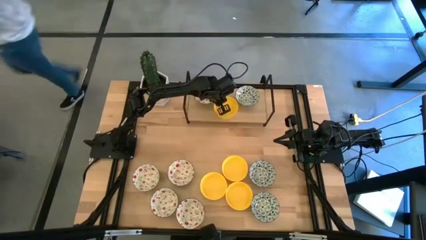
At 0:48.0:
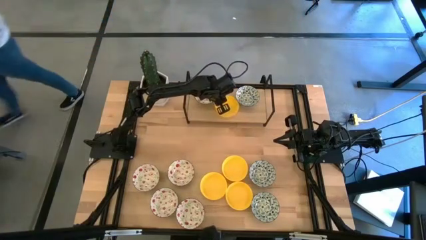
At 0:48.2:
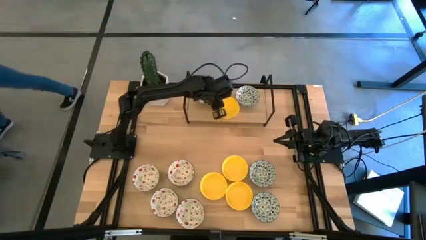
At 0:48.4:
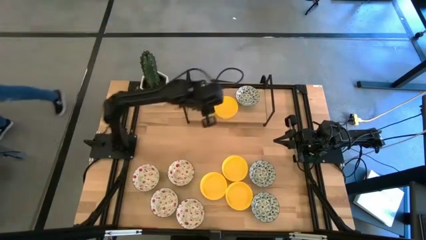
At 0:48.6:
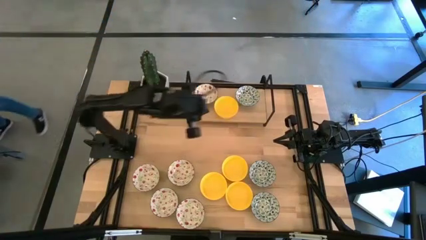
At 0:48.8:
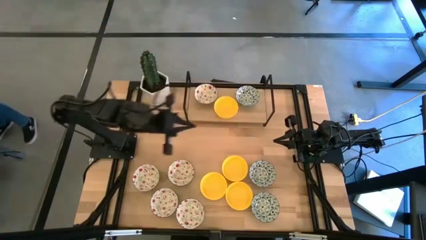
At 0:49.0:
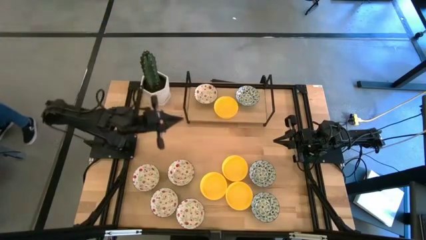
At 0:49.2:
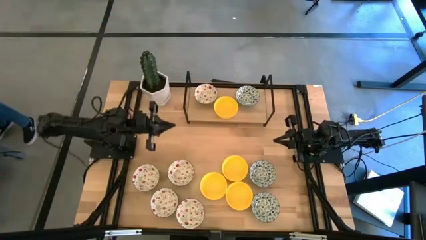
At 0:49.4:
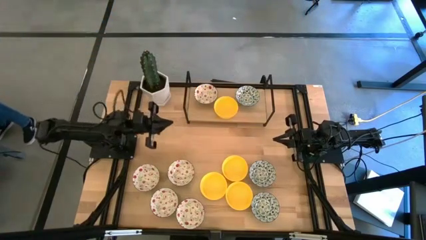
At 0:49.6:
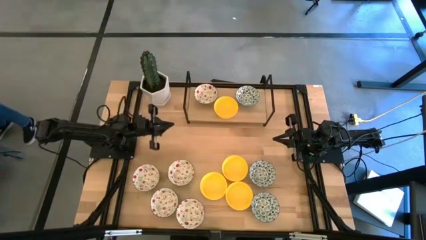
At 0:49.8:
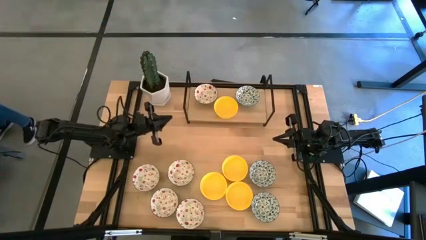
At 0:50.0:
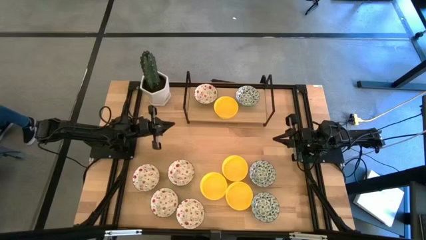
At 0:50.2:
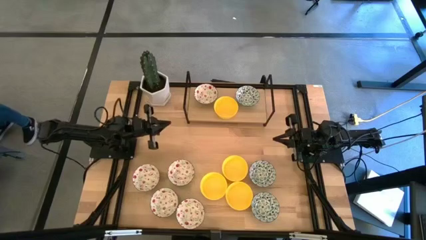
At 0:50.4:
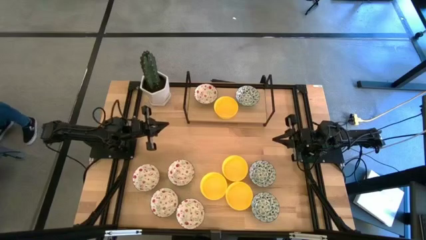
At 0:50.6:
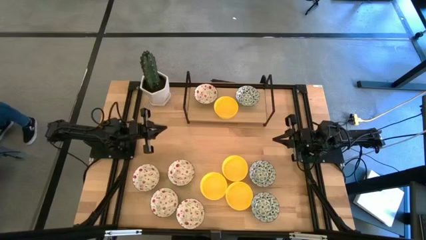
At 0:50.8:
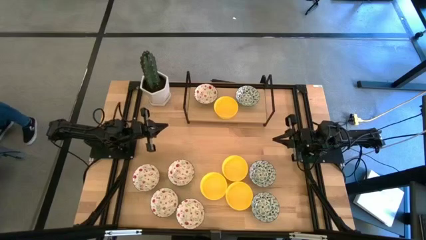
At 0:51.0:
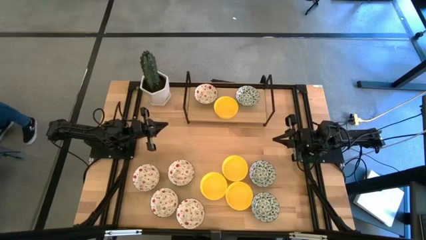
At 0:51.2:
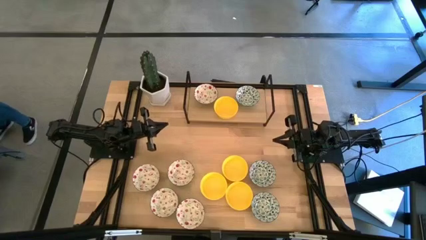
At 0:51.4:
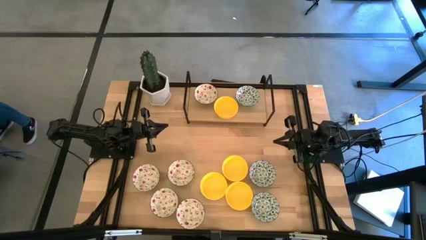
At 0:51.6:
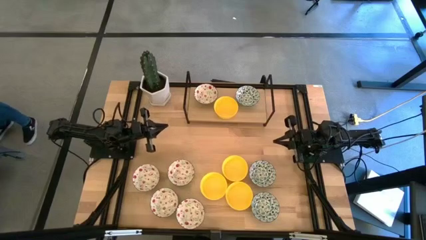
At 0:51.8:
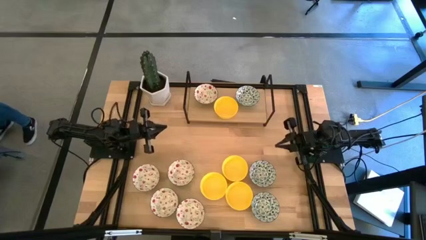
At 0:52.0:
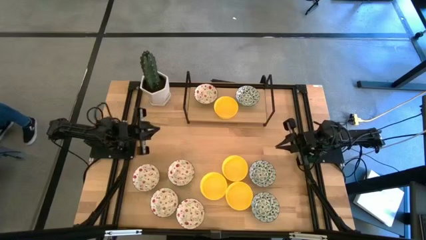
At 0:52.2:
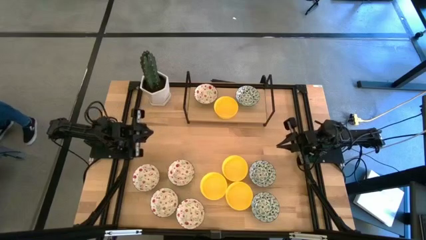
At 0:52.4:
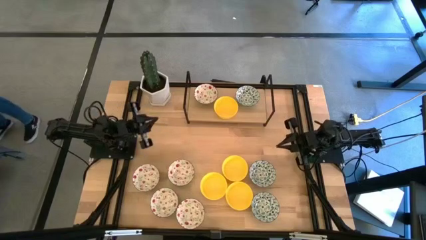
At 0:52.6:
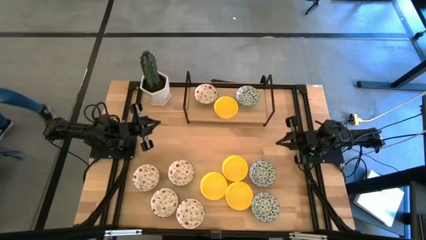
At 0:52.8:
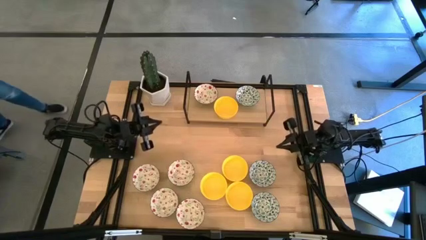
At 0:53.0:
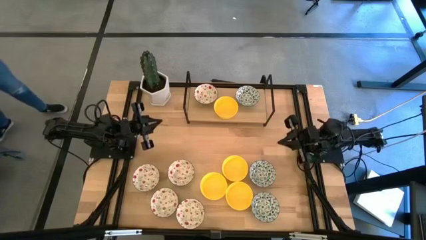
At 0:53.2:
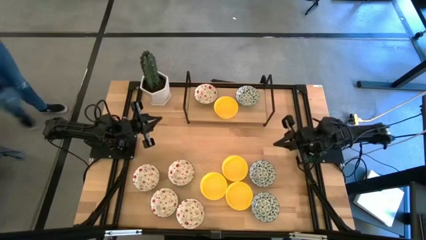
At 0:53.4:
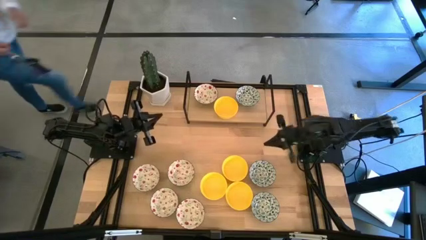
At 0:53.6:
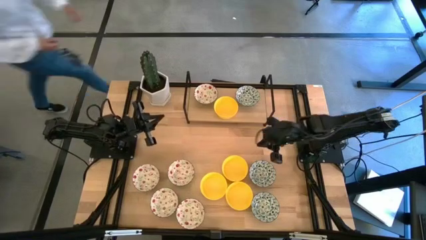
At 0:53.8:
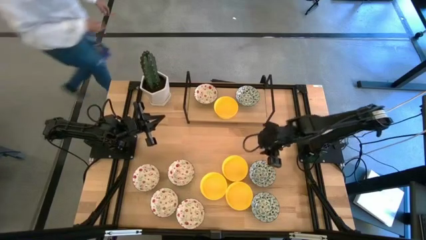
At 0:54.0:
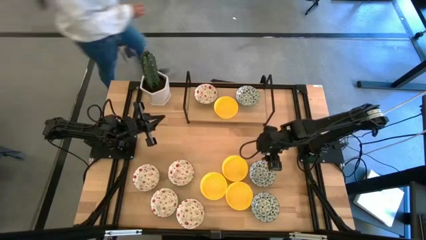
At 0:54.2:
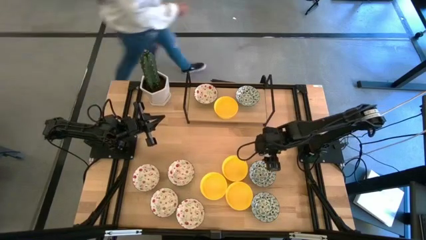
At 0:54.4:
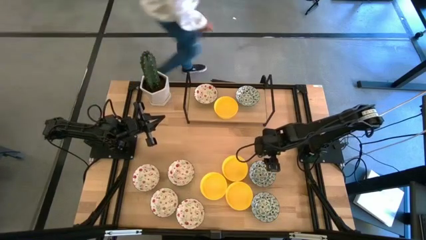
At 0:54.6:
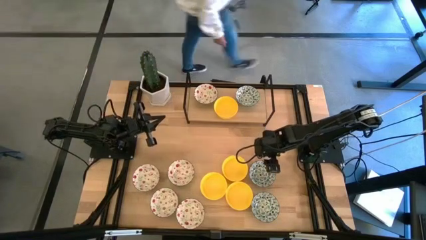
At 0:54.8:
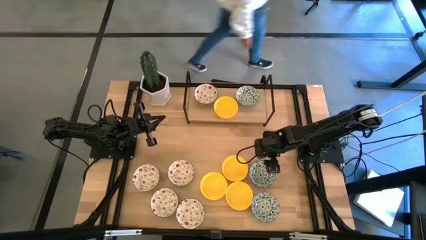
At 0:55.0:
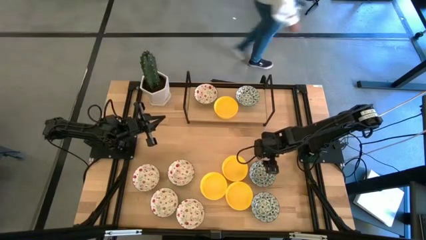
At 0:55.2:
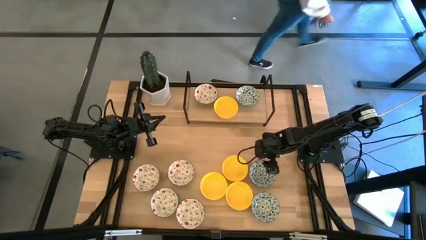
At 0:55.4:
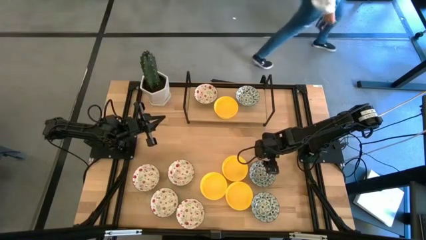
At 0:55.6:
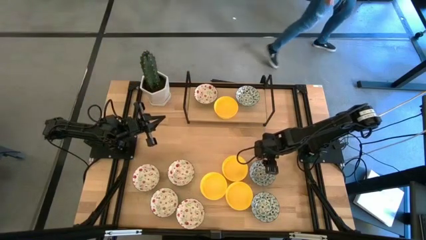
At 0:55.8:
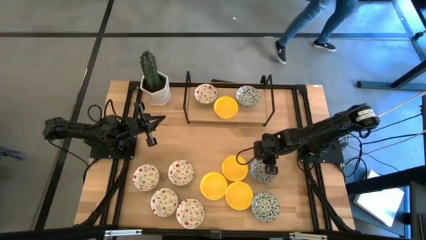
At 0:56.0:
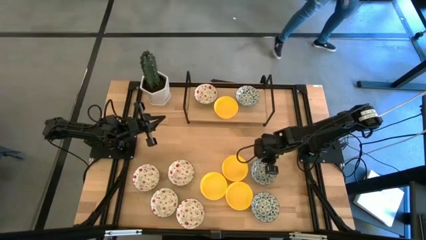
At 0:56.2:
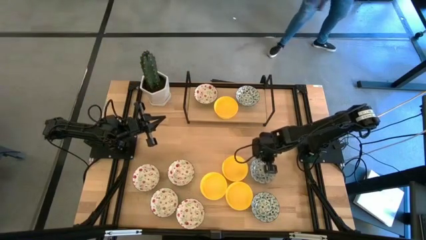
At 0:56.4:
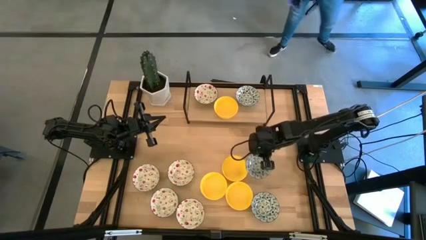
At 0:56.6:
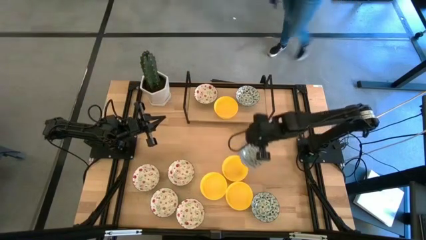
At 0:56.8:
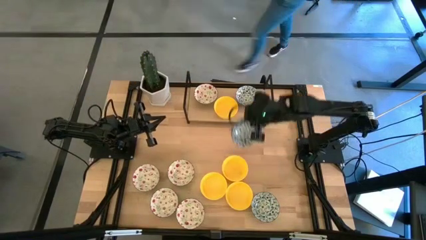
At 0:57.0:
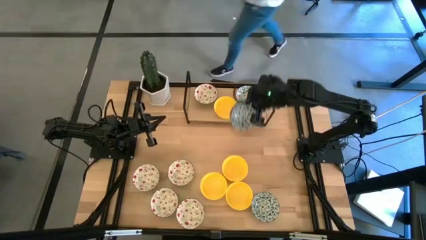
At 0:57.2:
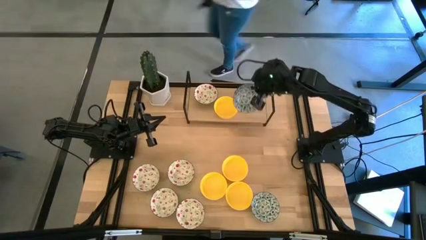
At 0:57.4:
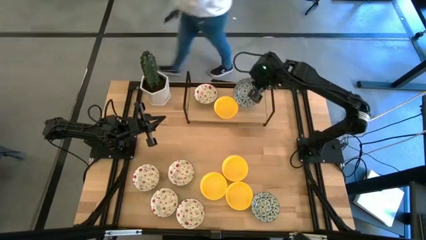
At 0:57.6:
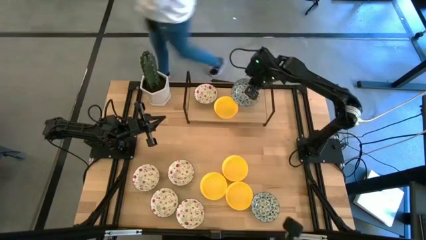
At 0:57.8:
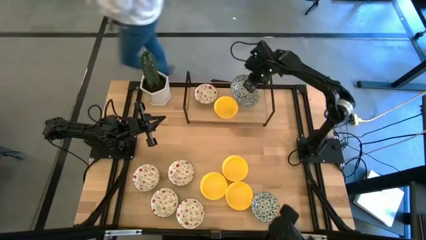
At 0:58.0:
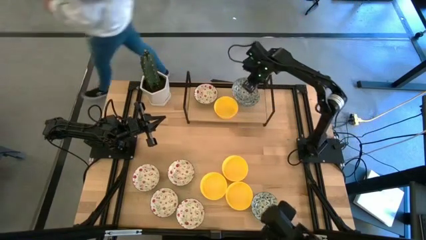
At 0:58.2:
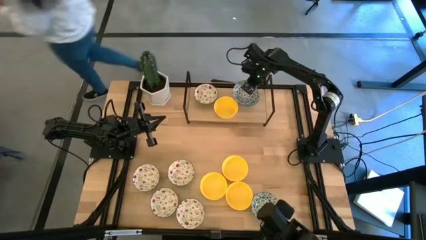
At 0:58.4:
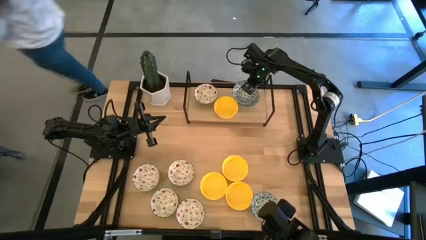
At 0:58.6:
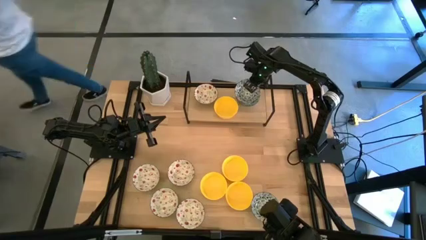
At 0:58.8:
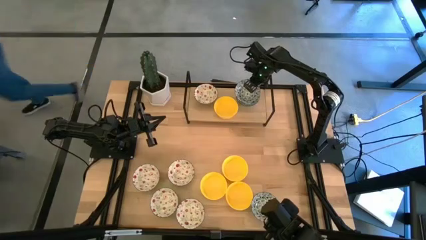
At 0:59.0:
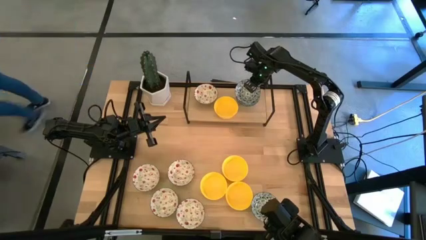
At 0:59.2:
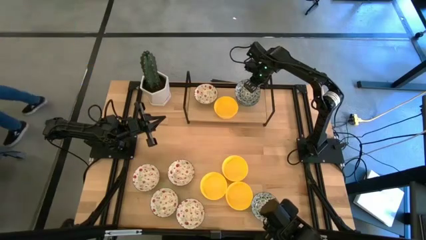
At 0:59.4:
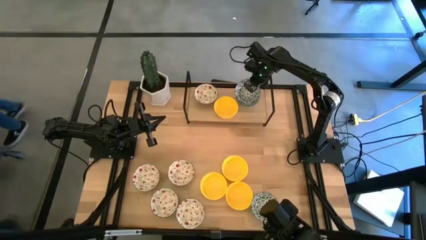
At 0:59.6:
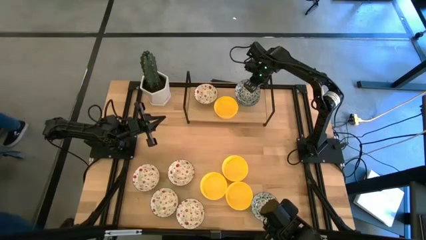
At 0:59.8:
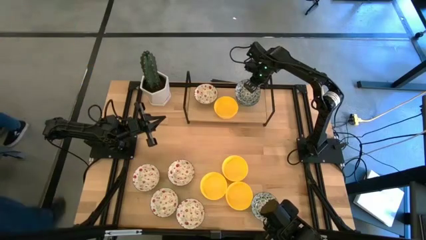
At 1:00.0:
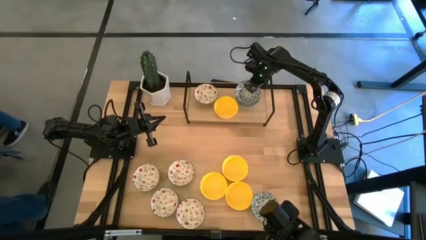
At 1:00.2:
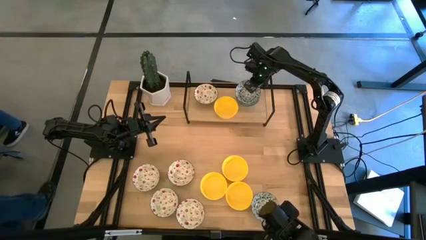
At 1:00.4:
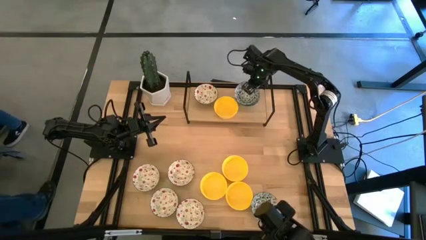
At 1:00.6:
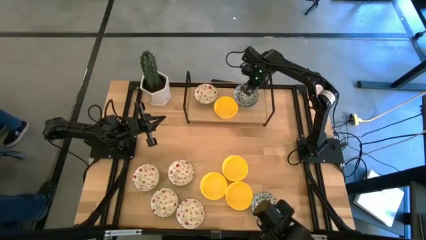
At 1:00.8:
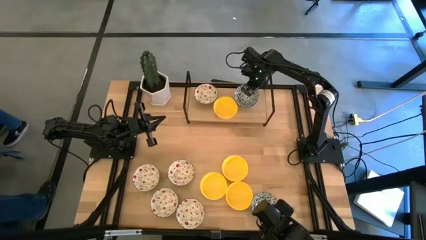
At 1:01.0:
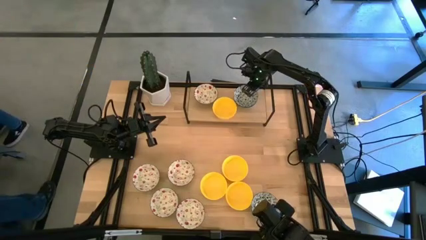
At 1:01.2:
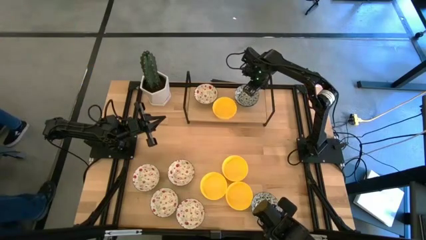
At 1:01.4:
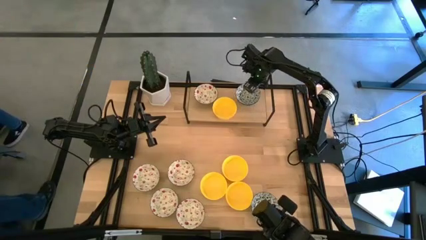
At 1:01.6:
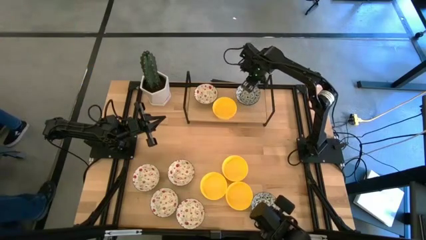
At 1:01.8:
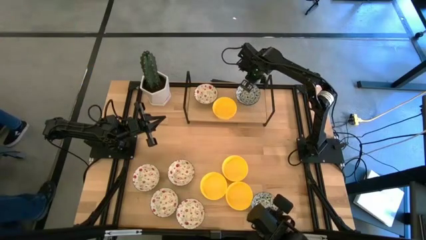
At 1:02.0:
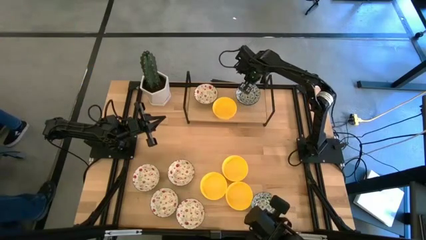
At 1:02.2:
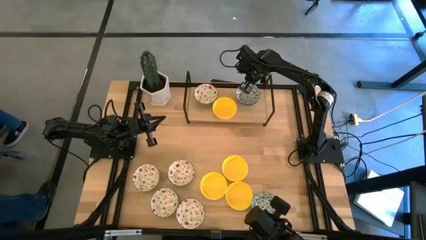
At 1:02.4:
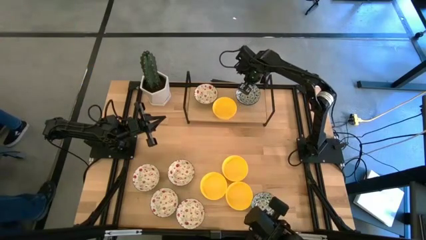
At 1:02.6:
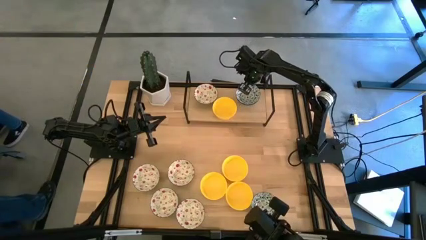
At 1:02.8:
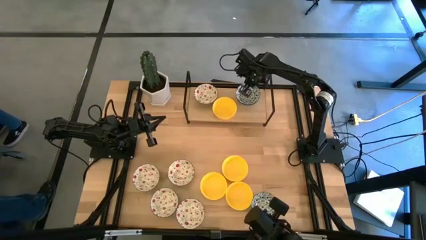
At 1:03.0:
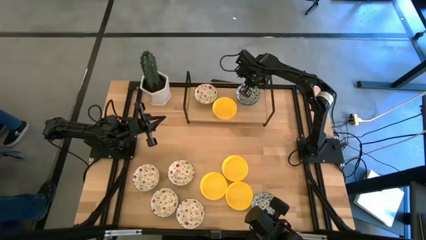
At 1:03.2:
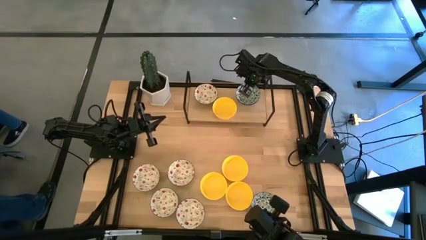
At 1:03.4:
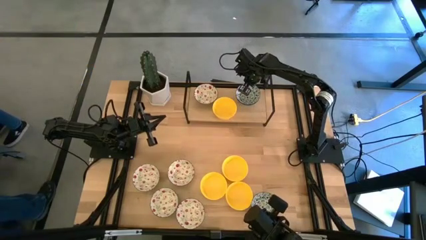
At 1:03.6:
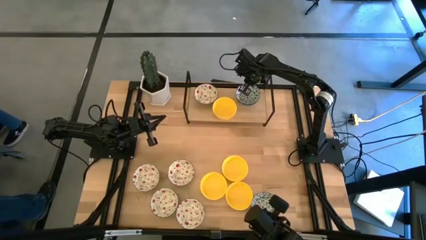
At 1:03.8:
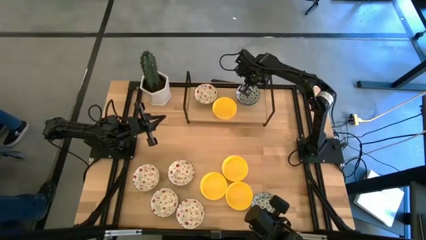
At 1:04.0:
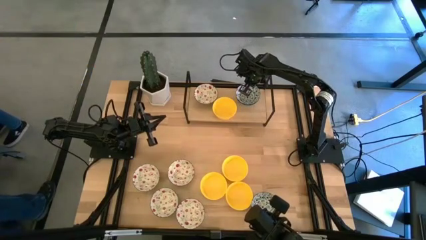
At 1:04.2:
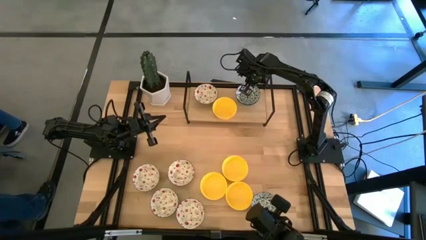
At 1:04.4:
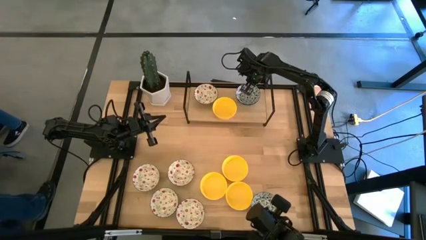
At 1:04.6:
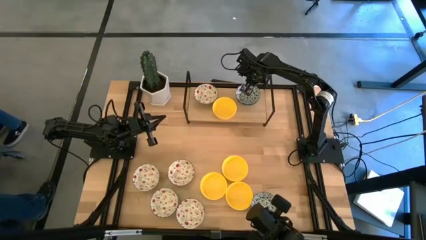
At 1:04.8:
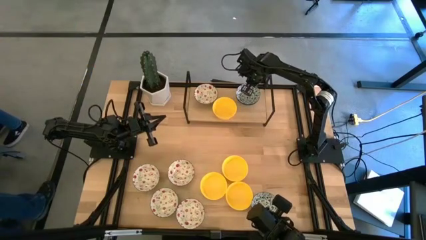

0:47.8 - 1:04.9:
Task: Pick & Place Mini bowls
Stack the top blue bowl on top of the blue bowl on the shelf
